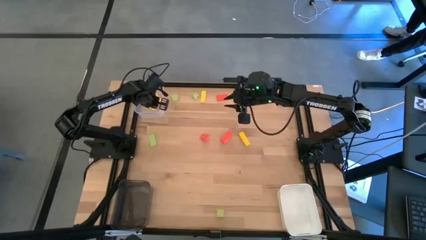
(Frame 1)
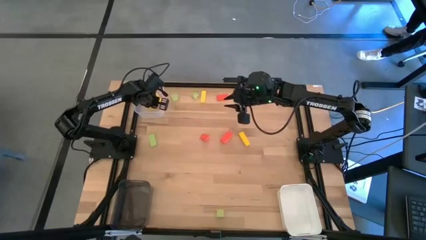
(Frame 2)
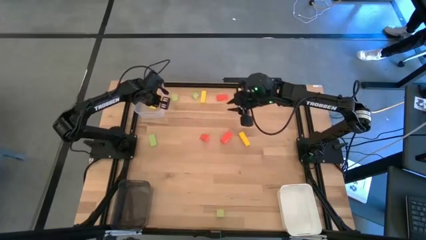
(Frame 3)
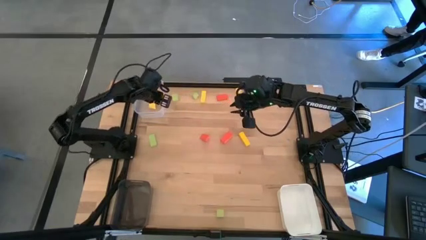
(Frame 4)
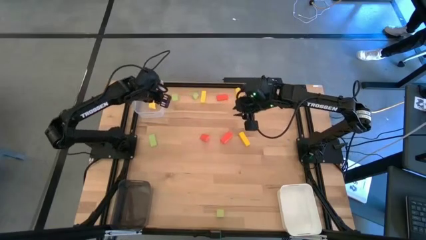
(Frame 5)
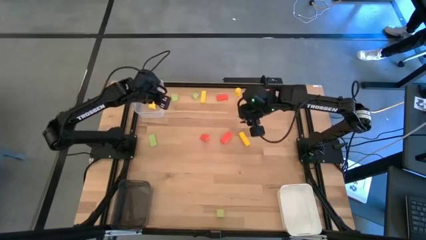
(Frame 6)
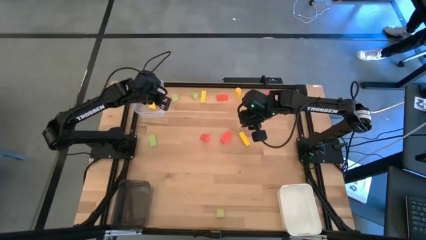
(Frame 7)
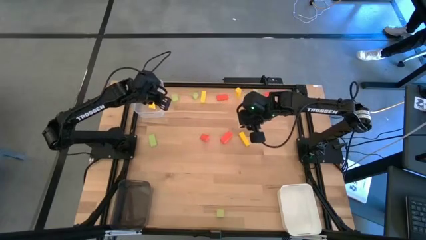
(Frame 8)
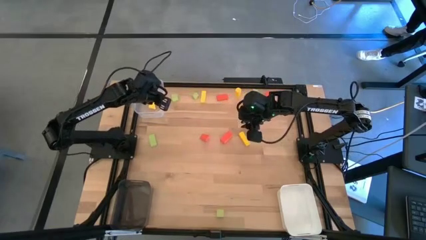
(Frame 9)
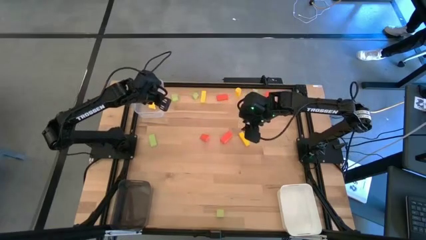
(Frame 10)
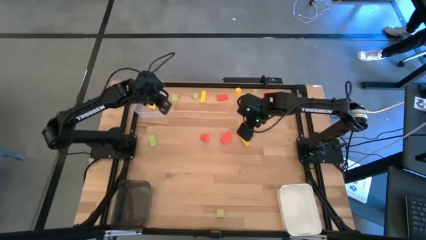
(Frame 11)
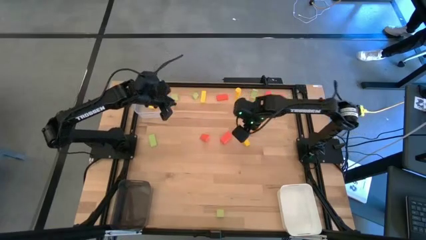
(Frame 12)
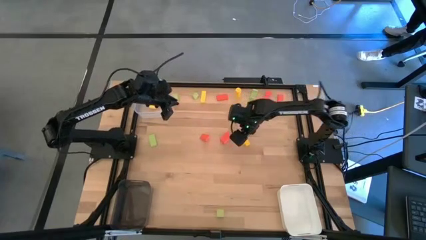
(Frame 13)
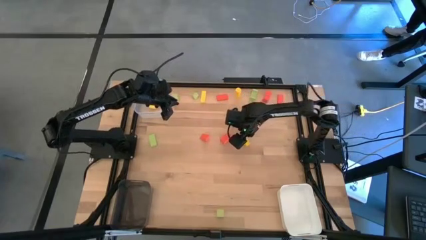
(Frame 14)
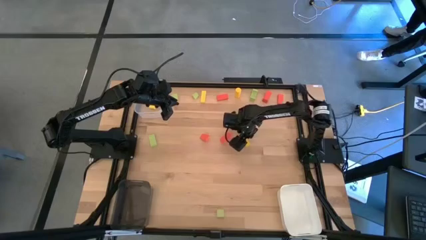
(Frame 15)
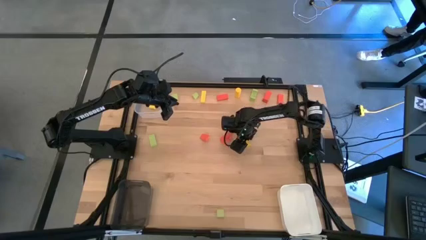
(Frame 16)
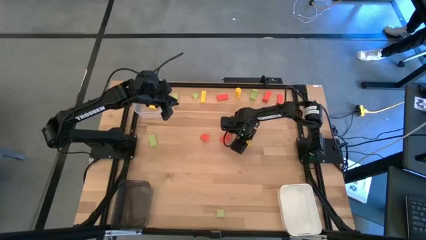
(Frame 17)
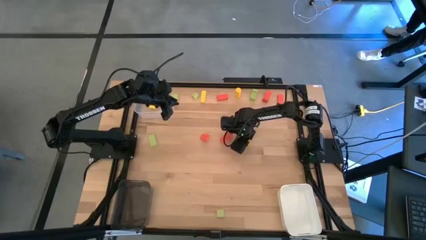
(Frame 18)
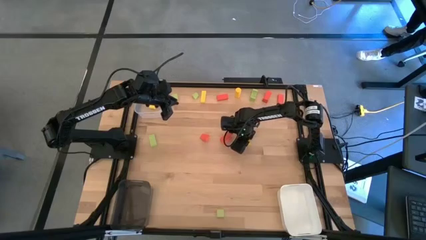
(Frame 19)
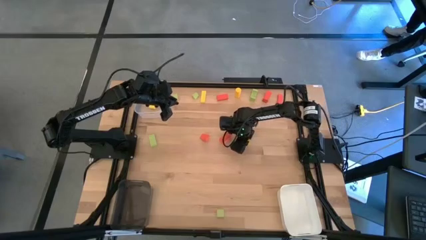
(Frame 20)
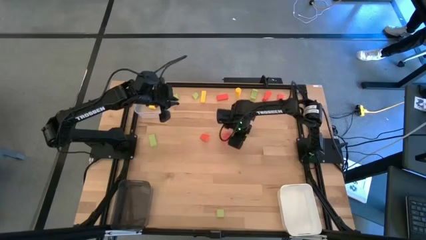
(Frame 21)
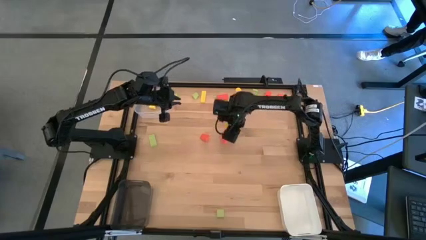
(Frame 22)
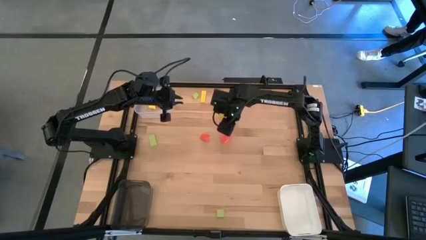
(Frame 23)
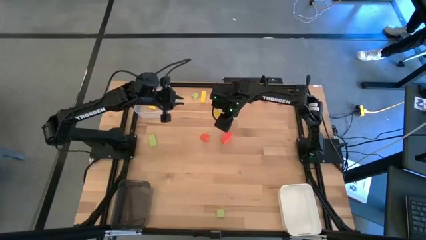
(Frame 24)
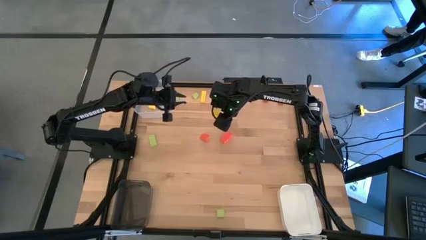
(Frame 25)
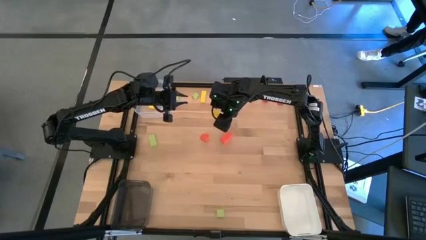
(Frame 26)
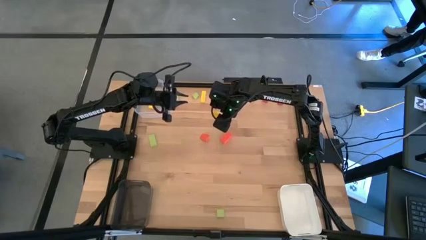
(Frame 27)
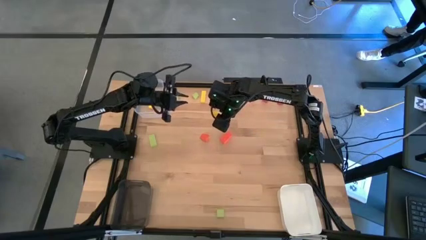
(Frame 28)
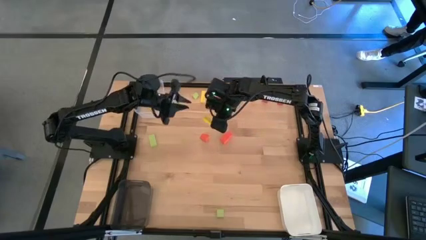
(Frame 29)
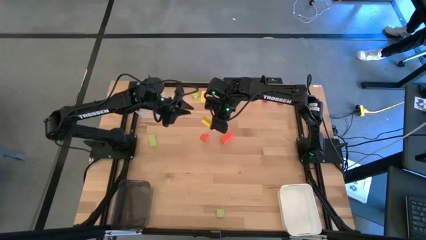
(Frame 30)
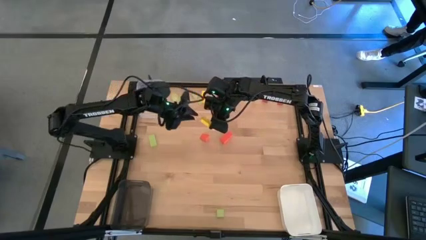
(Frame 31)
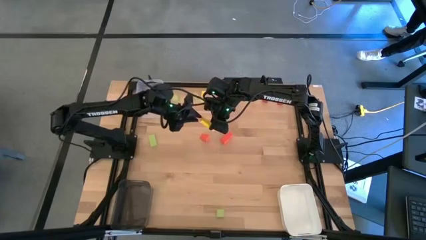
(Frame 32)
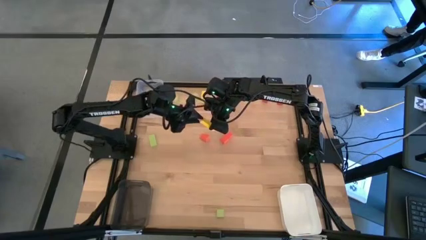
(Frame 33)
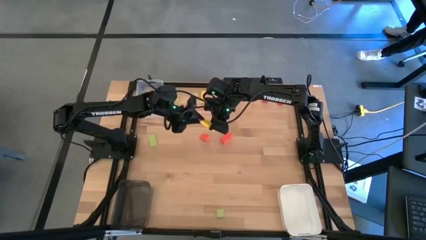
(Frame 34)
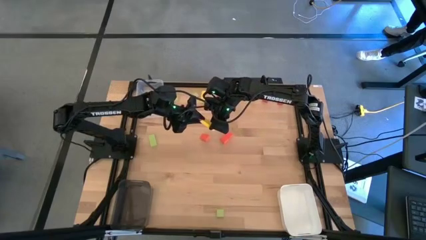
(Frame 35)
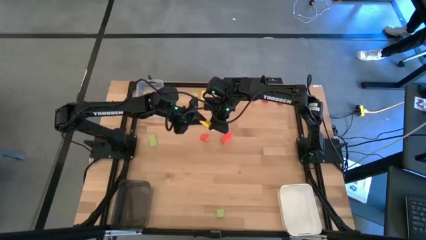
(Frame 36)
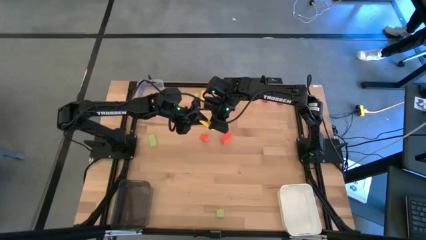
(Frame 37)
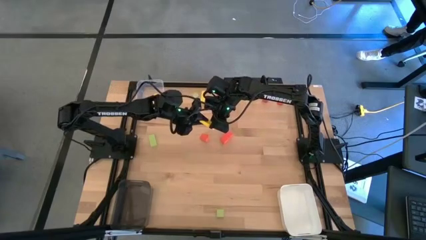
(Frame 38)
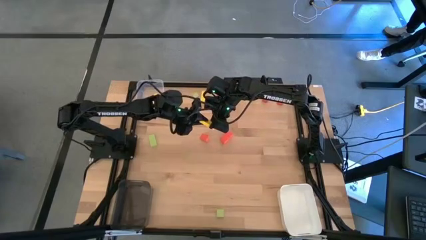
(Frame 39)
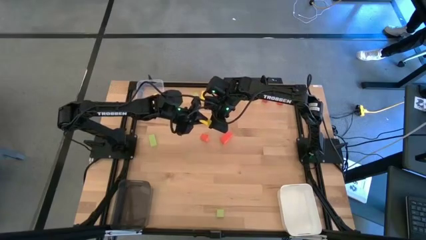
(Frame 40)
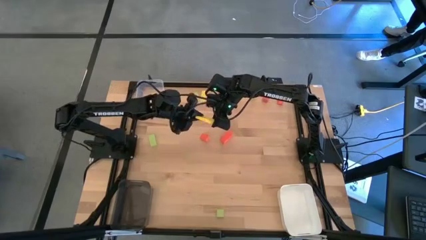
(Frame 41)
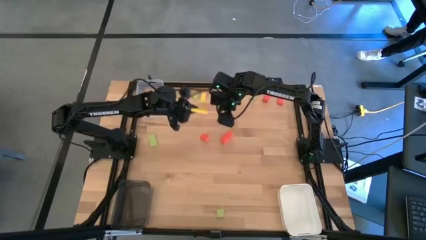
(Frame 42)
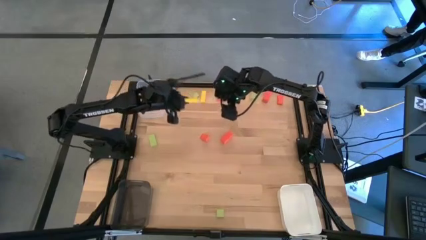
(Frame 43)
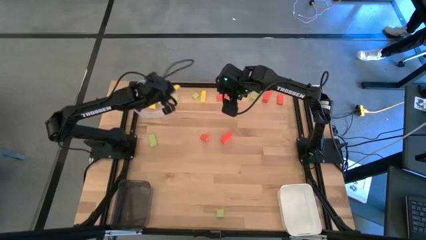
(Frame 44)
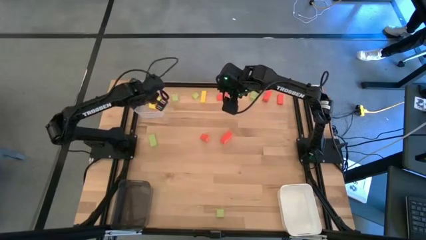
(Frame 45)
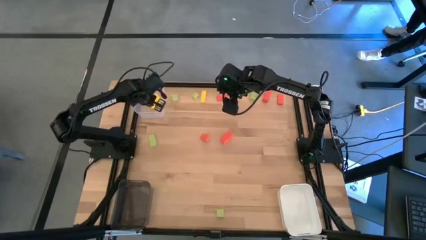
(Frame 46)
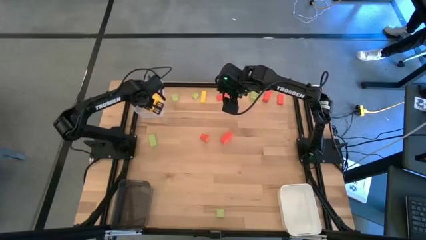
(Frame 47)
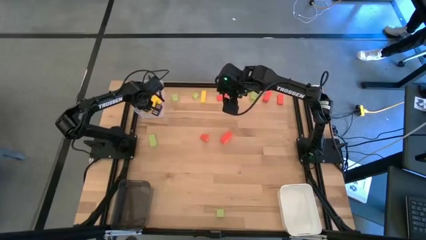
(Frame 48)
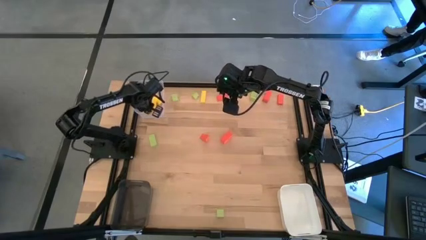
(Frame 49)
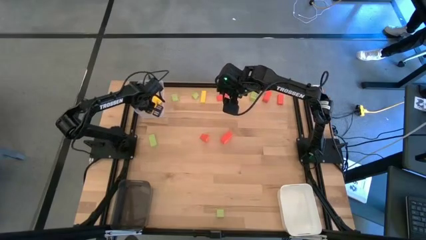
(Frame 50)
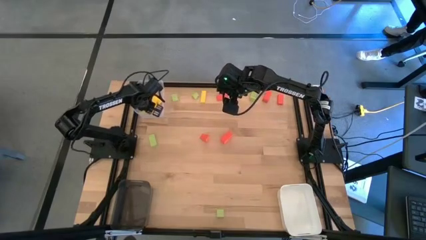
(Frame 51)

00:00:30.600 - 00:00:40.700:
Task: Sort & place blocks by color
Put the yellow block into the transparent bin
